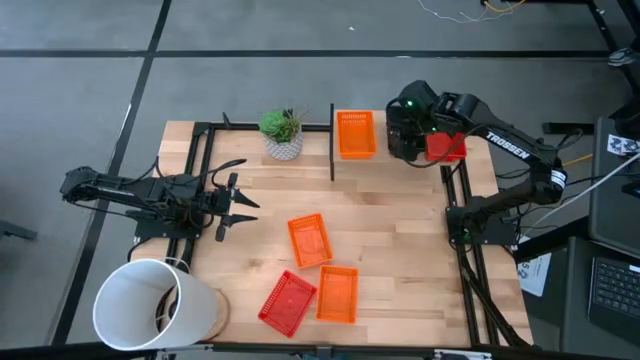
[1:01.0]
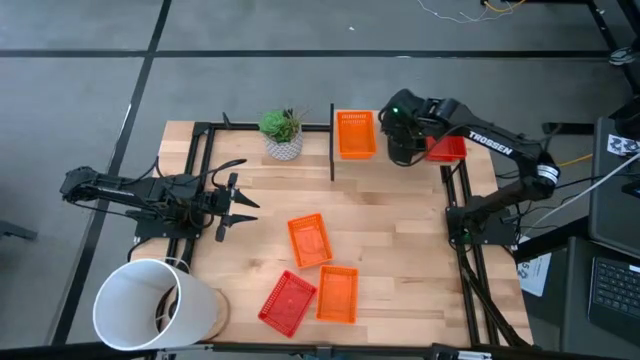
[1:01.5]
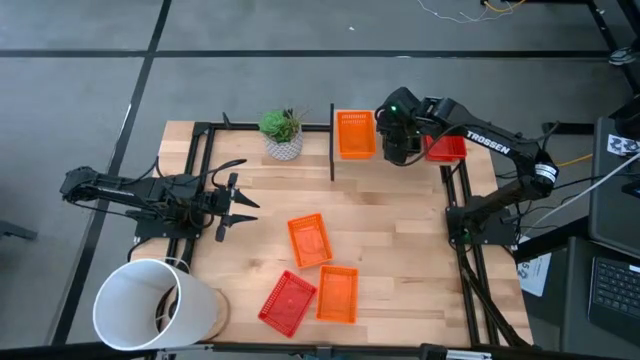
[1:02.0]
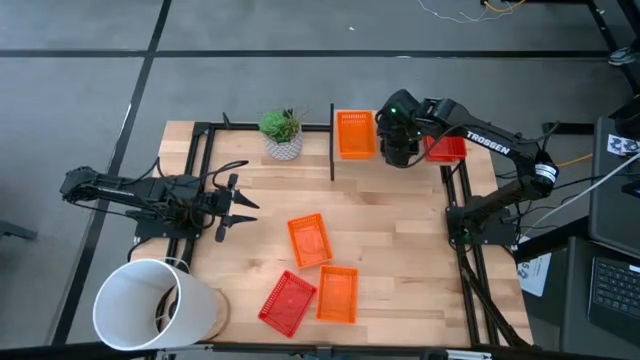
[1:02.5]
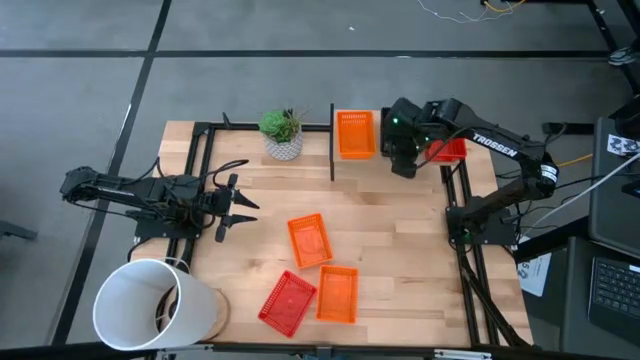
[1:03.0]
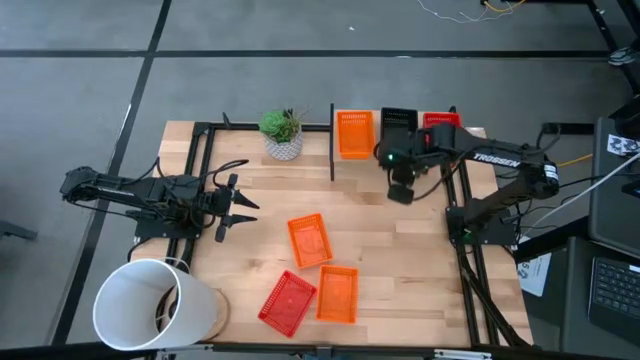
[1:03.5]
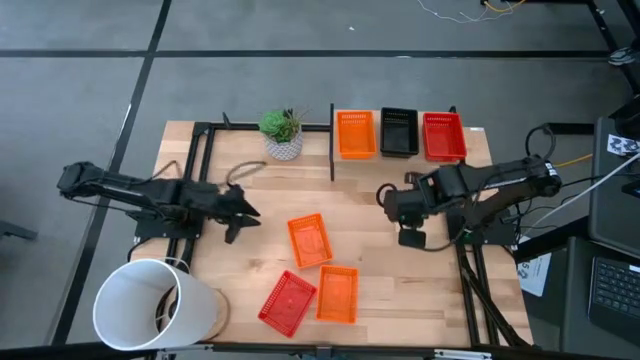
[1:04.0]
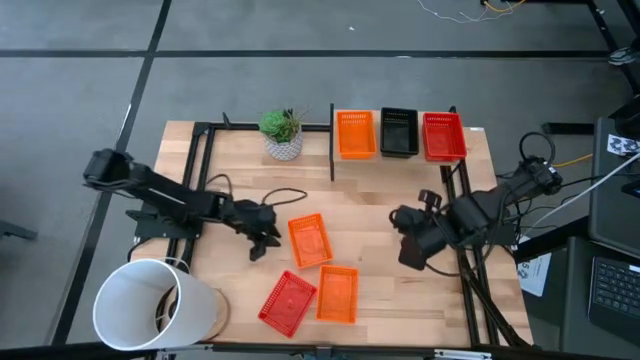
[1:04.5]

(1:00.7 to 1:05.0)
Task: Stack baskets on shelf by color
Move the top orange bin

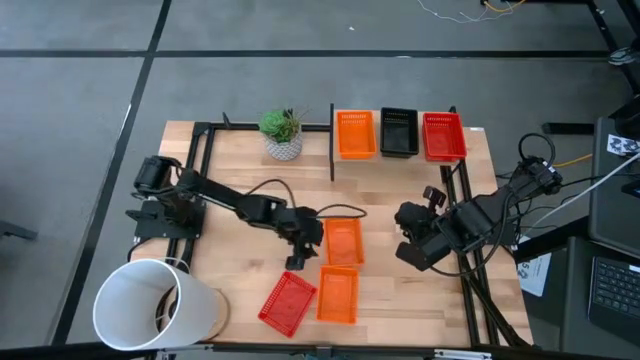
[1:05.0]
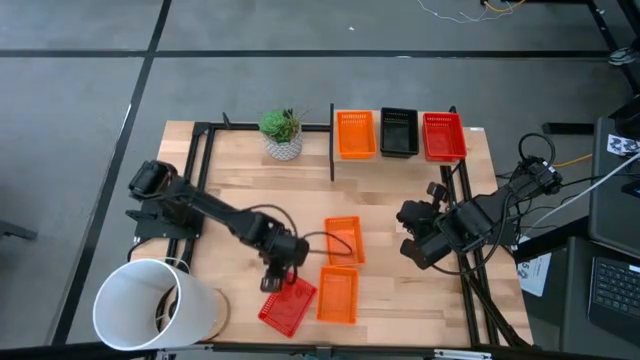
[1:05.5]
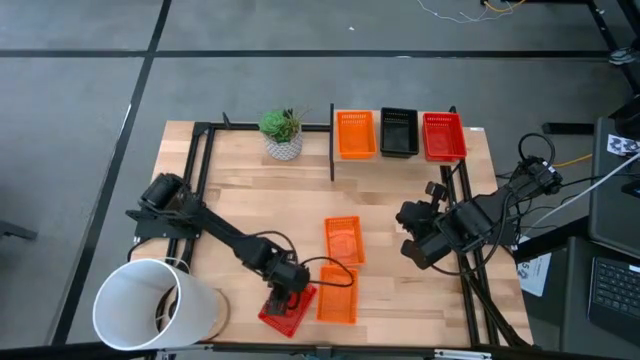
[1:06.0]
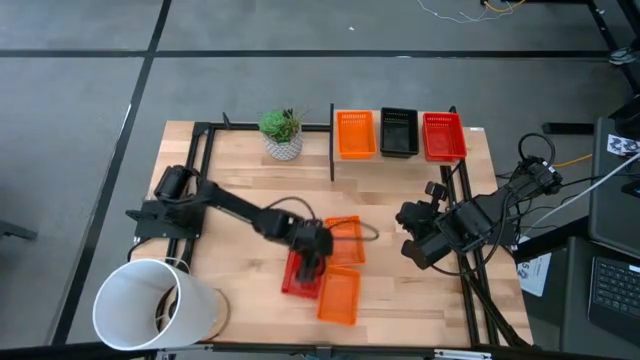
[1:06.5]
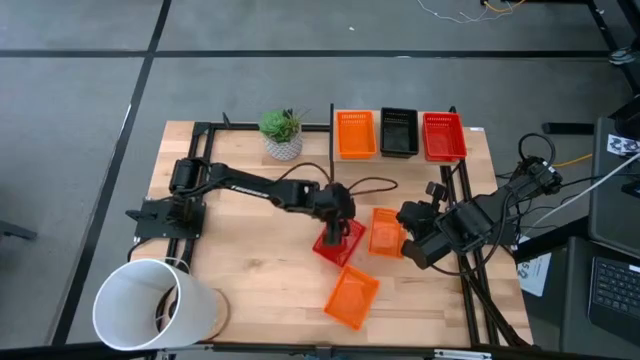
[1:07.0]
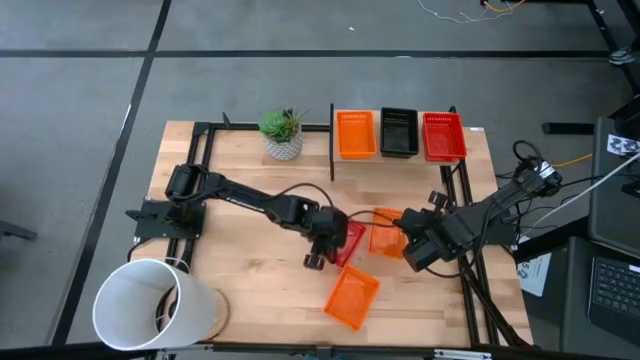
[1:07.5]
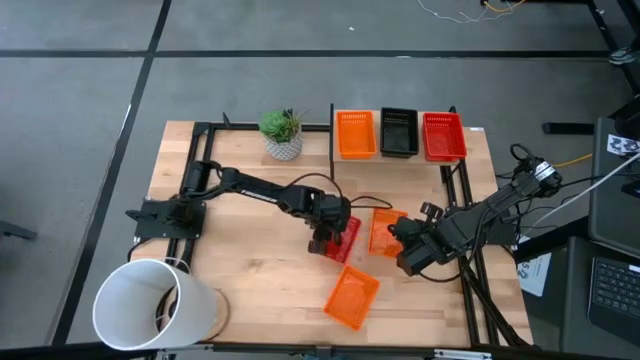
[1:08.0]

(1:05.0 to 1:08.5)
Move the red bin

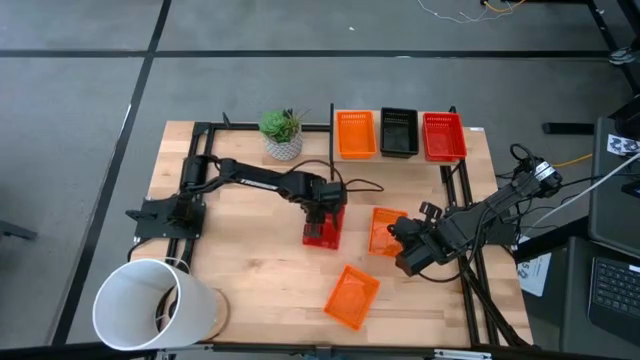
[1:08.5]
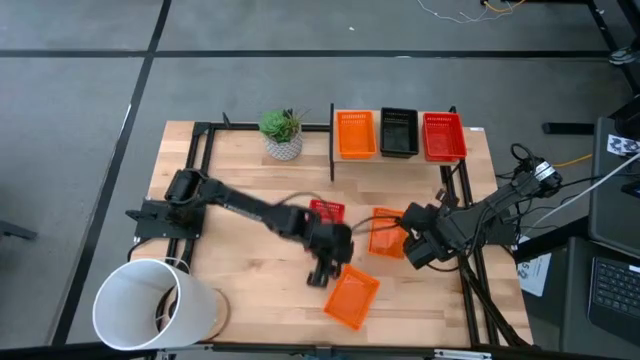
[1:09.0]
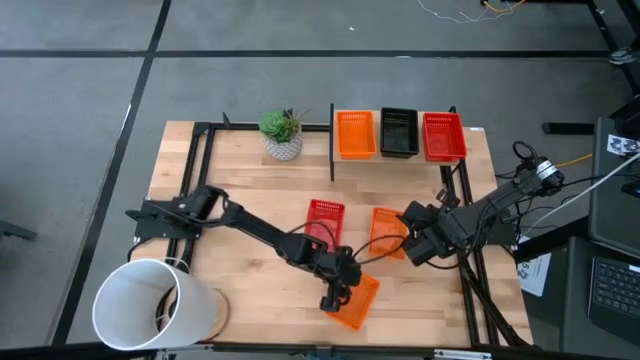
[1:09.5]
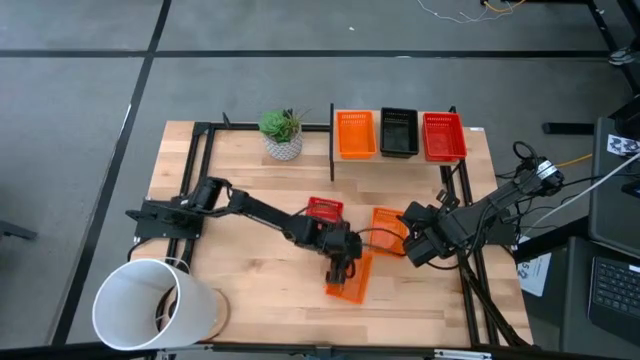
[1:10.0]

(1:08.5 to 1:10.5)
Move the bottom orange bin

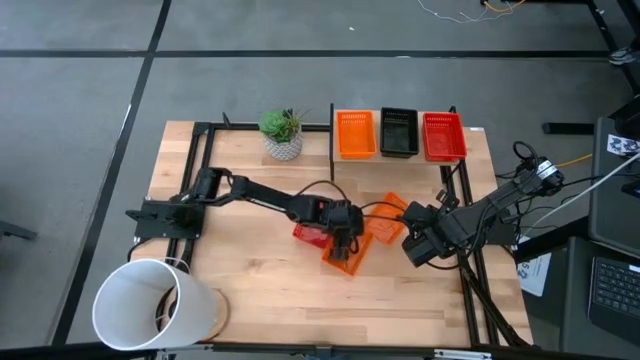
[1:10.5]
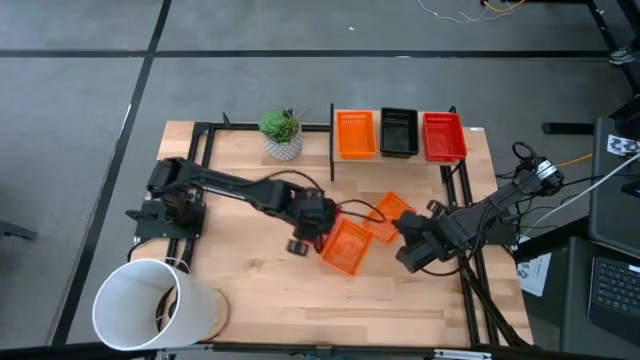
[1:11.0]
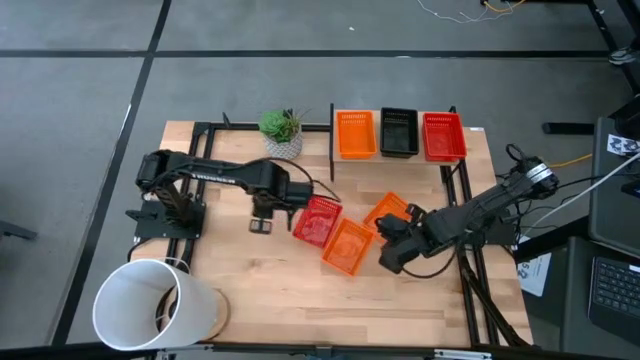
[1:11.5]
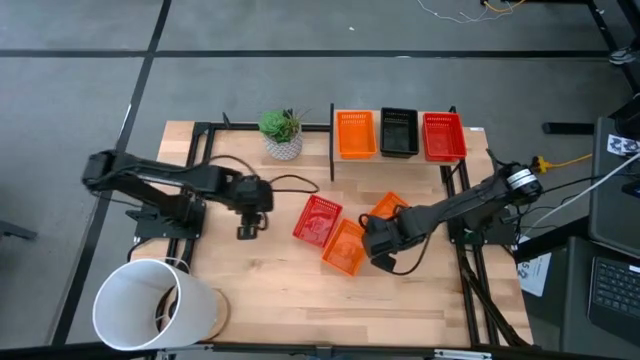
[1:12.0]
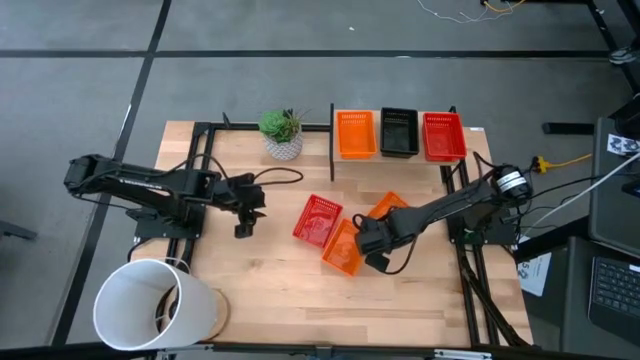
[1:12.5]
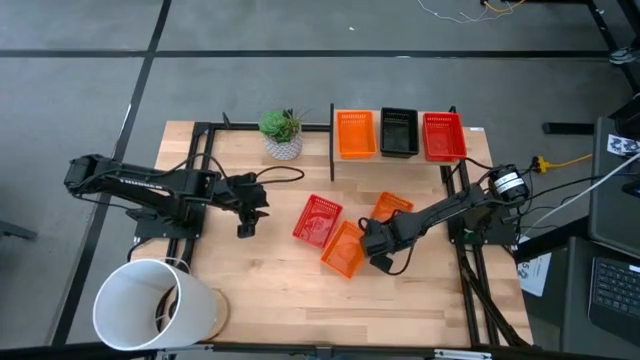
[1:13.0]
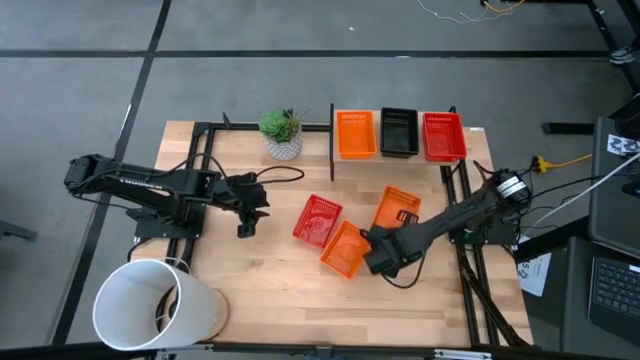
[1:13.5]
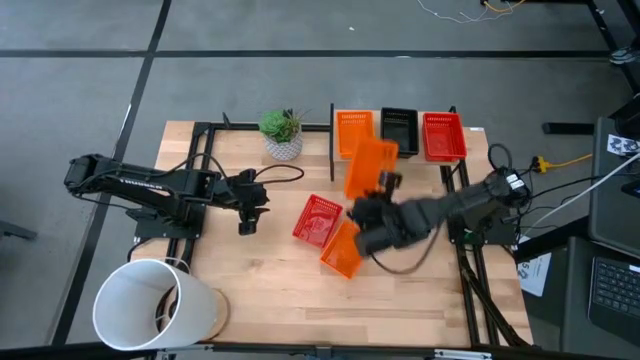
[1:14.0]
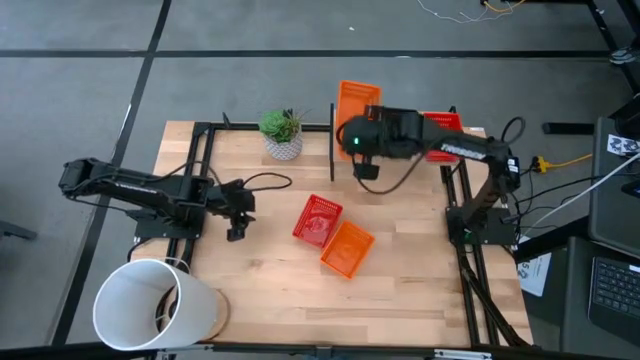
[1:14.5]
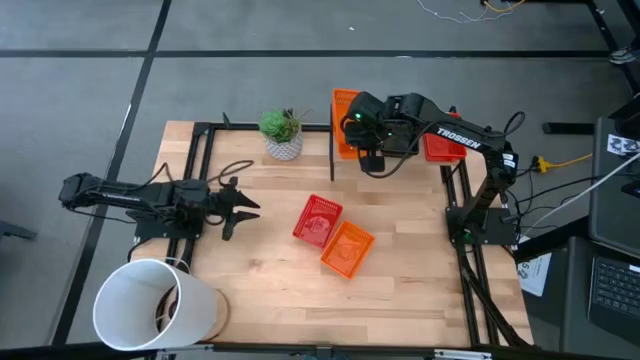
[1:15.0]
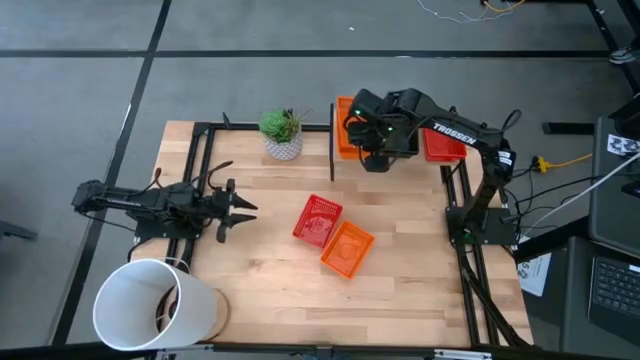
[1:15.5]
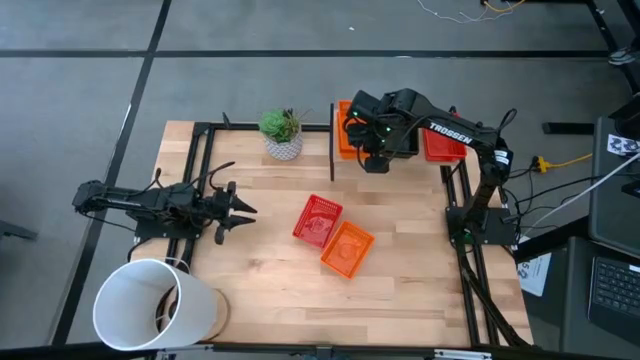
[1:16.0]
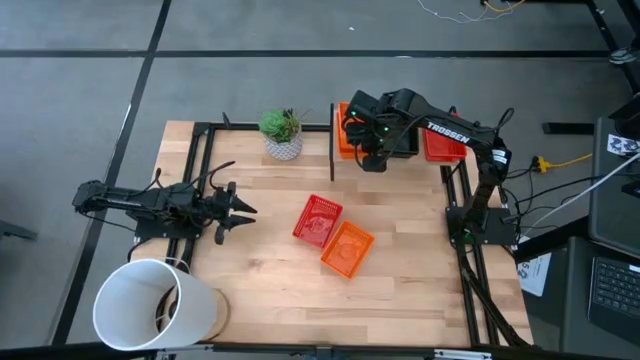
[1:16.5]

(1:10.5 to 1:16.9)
Stack the top orange bin on top of the orange bin on the shelf

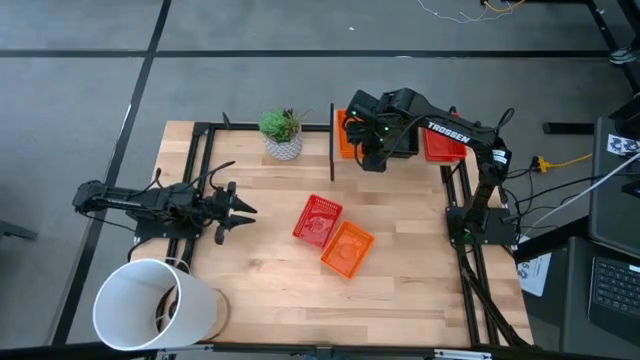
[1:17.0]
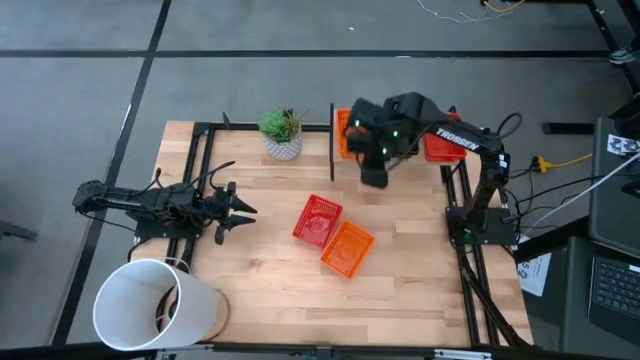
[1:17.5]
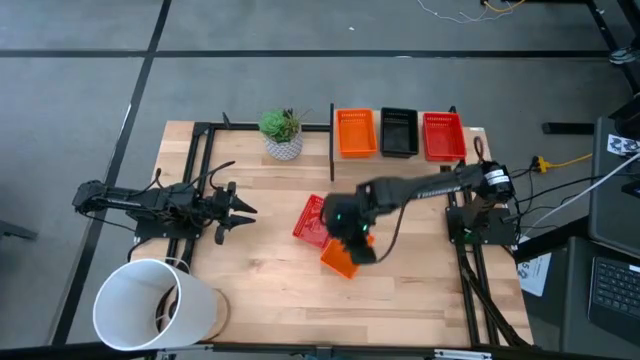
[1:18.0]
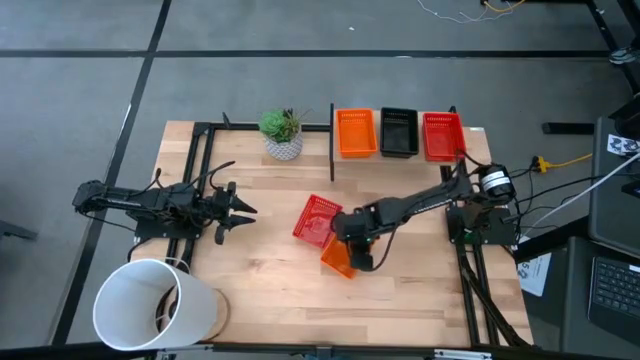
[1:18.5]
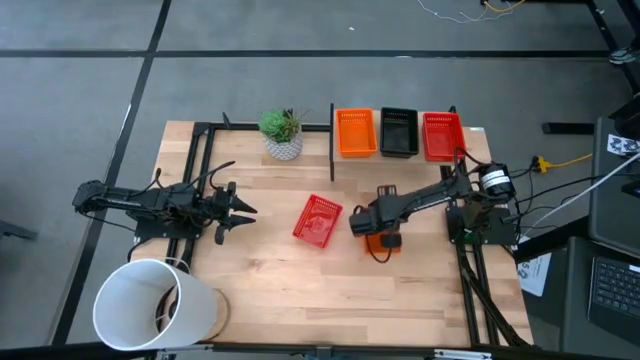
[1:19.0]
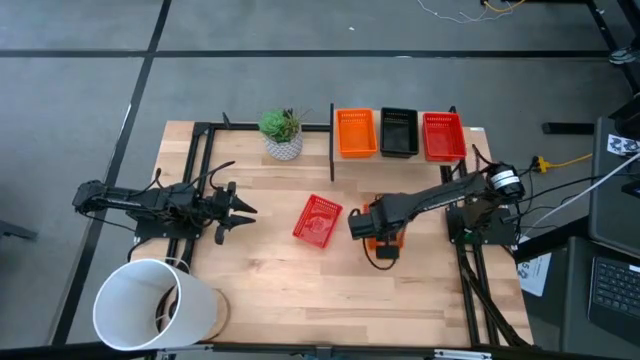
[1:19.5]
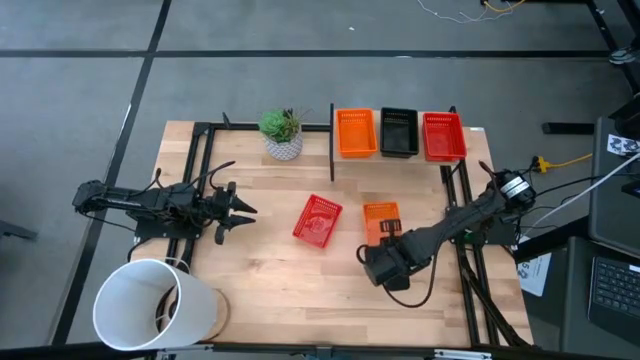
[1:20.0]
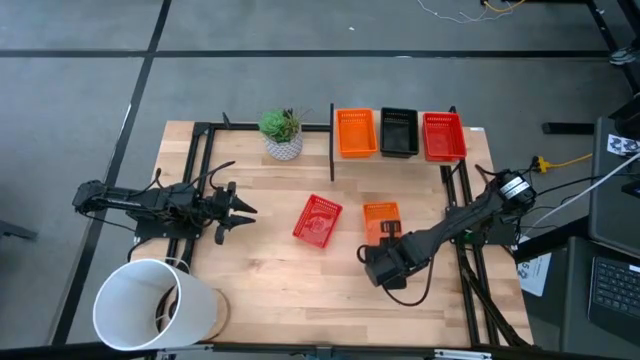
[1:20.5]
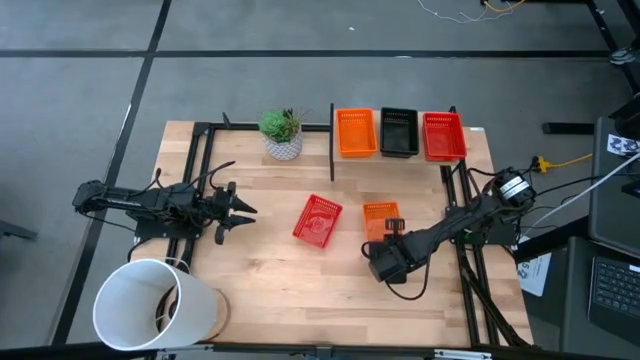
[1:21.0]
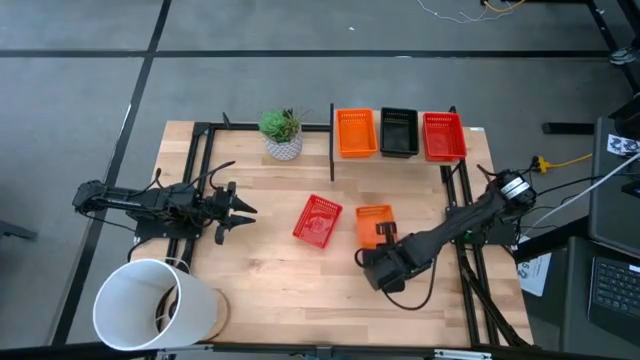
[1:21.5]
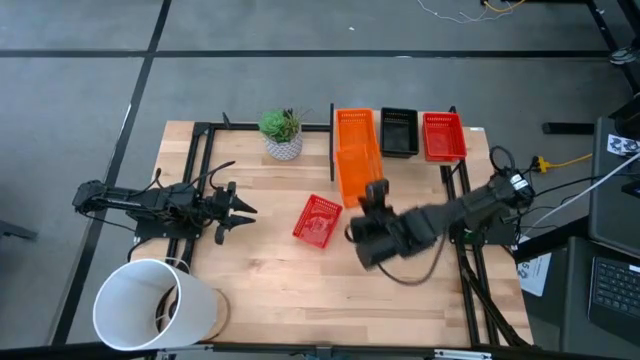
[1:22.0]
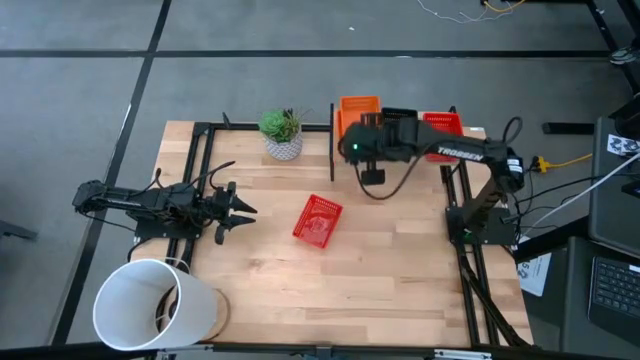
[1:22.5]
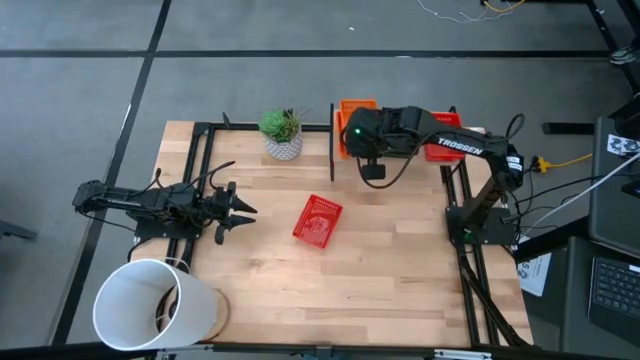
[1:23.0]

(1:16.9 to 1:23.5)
Stack the orange bin on top of the stacked orange bins on the shelf
